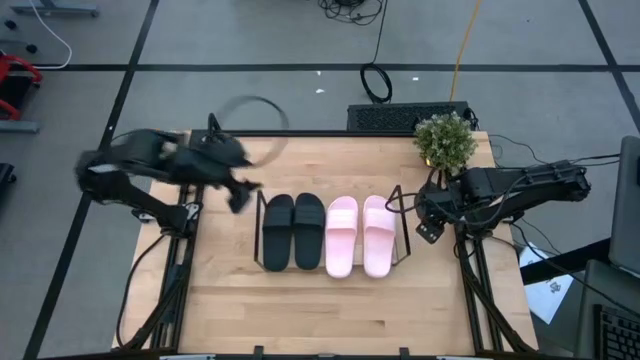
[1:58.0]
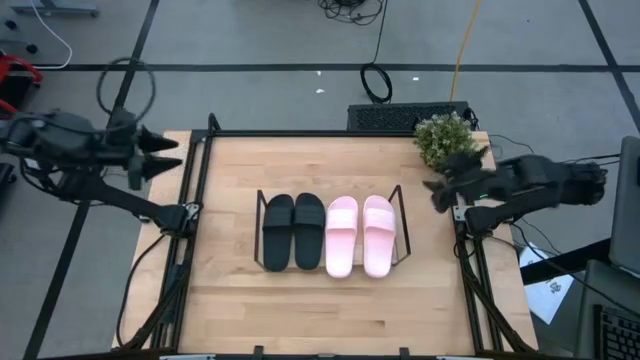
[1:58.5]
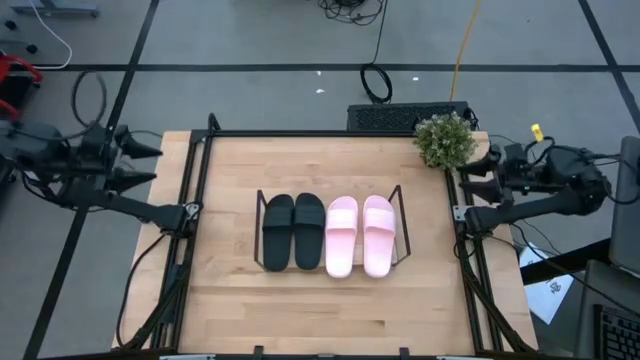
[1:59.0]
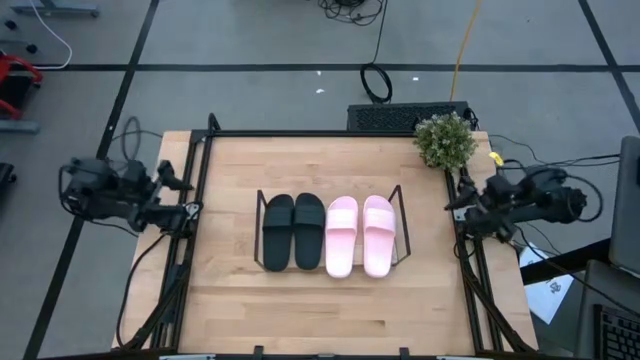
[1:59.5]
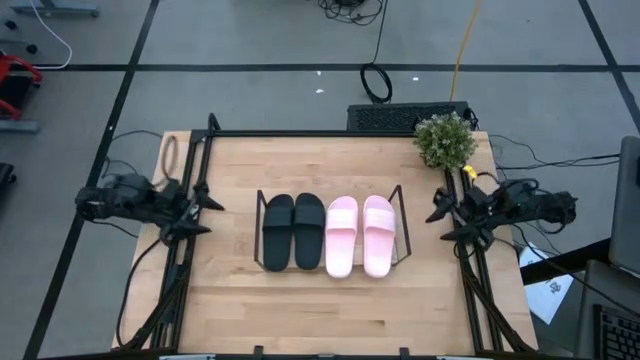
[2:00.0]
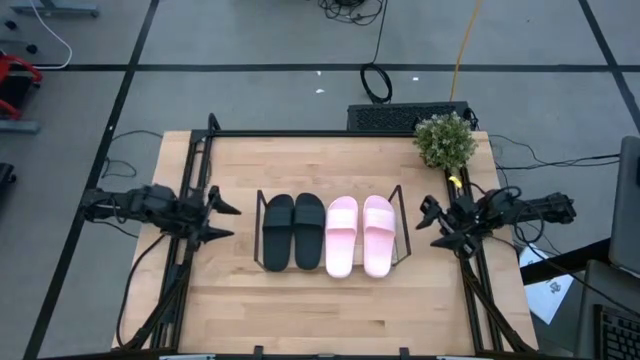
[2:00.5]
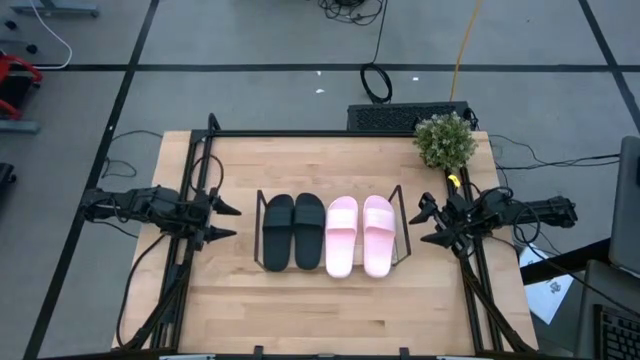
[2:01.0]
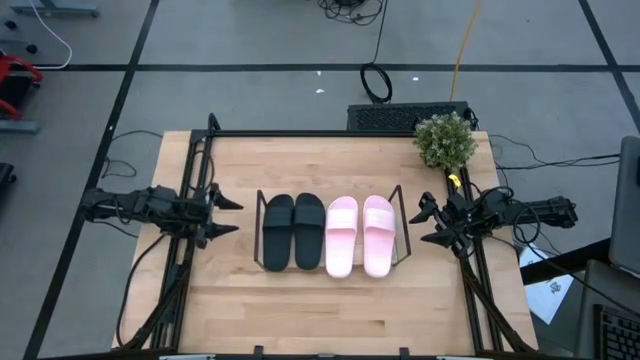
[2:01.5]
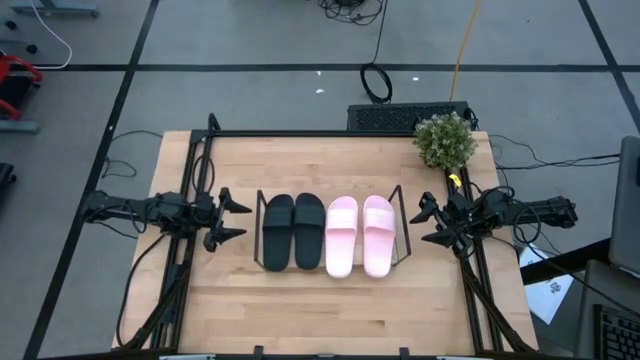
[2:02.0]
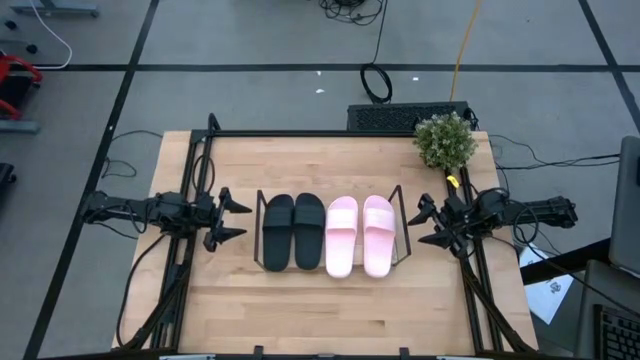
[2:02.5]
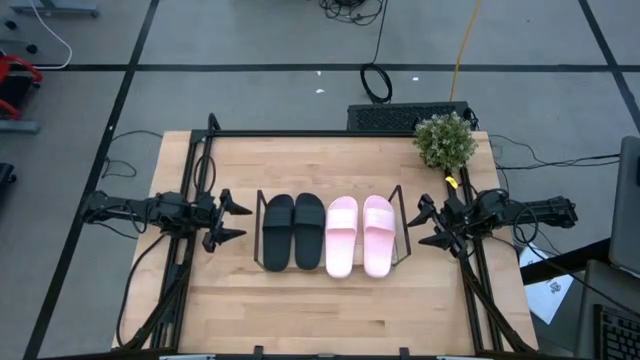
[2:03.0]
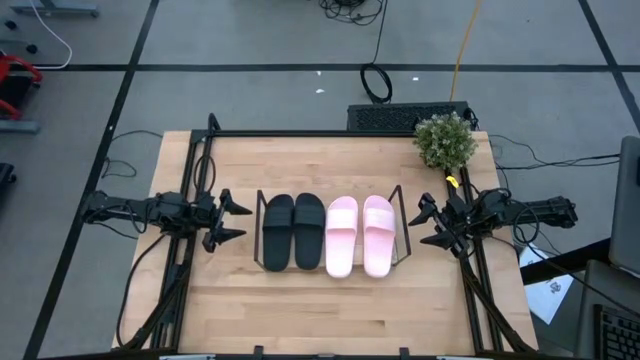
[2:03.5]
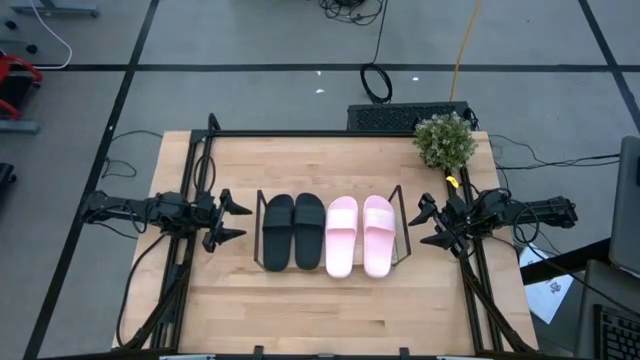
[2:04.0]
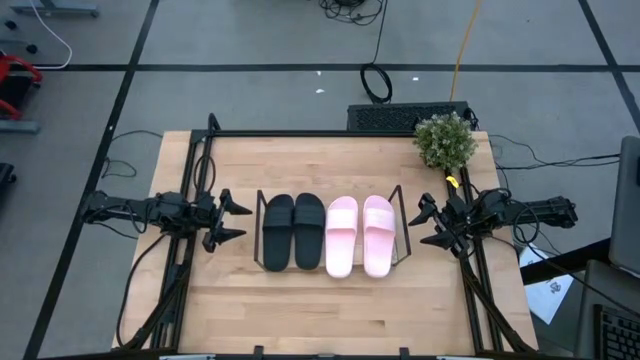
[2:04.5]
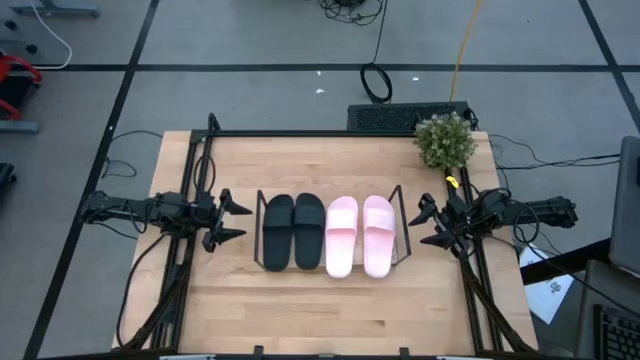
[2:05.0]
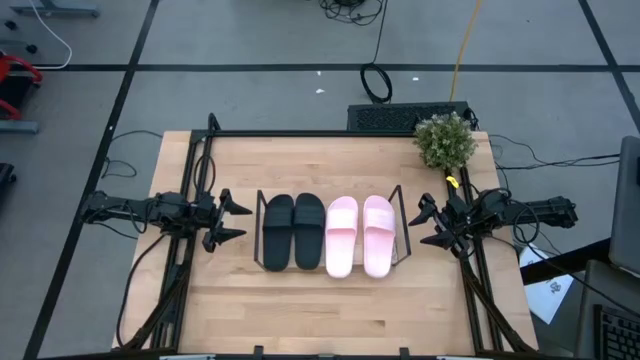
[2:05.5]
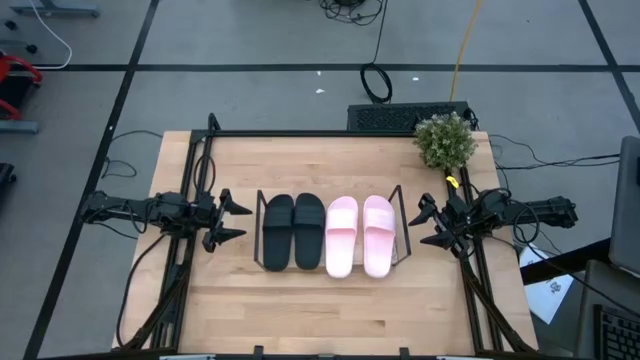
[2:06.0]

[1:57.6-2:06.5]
Task: Pick and place slides into the shelf
Return to Home Position

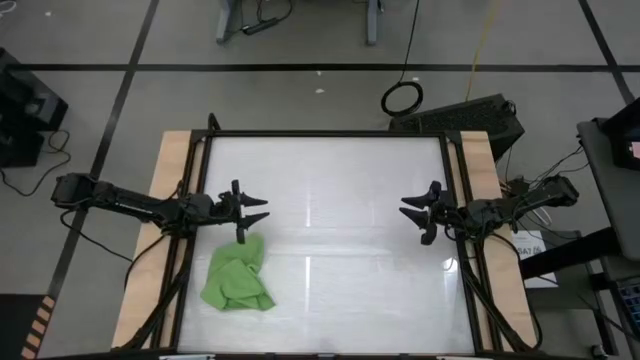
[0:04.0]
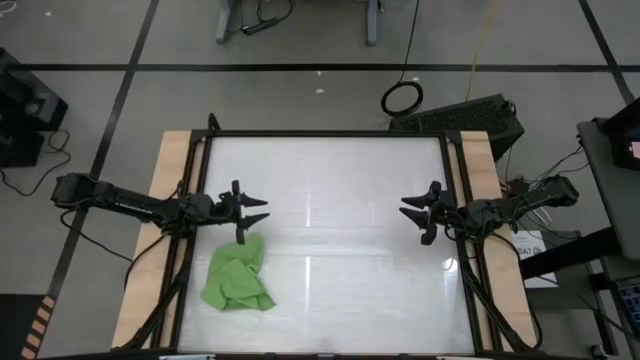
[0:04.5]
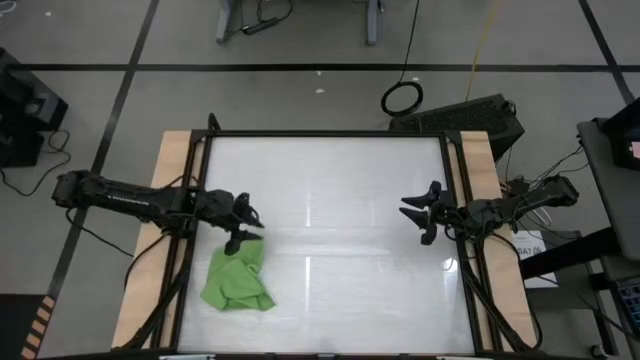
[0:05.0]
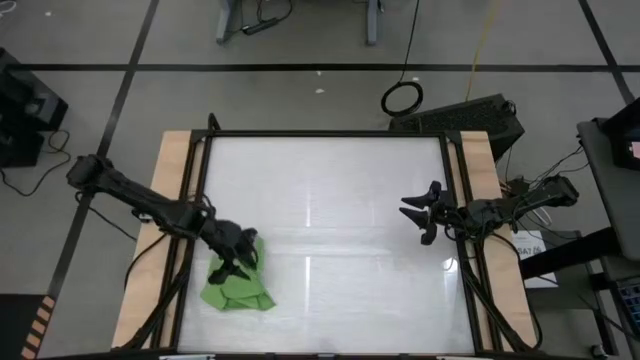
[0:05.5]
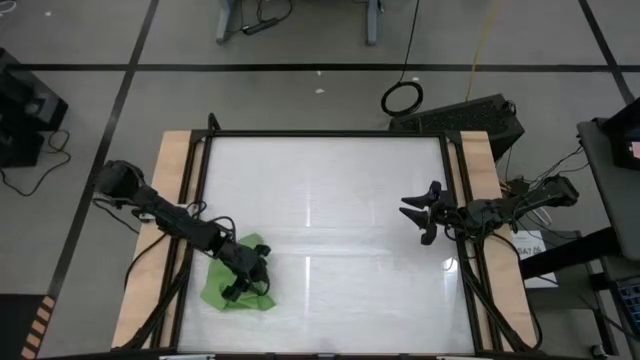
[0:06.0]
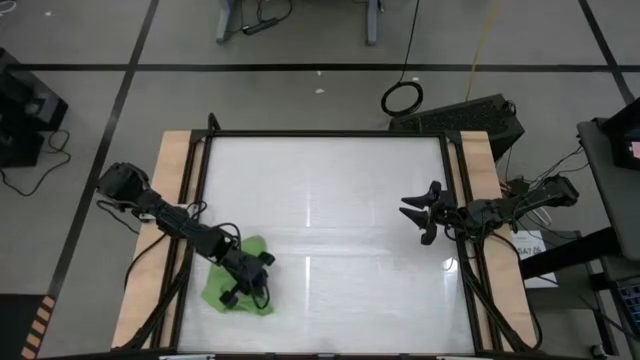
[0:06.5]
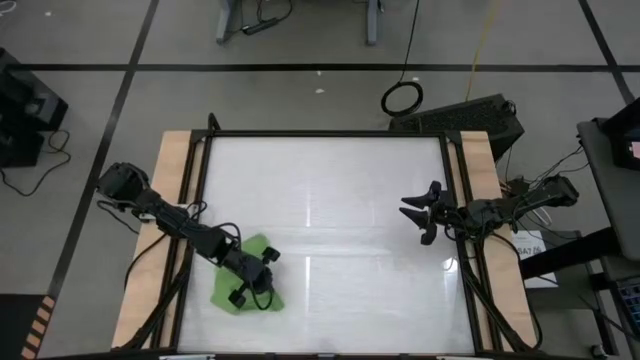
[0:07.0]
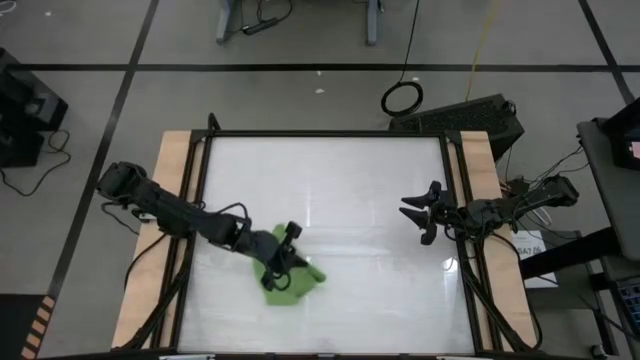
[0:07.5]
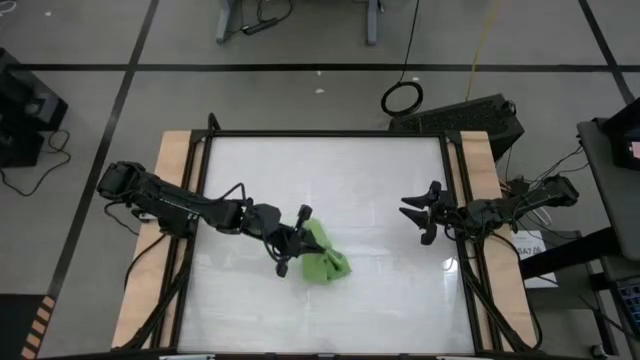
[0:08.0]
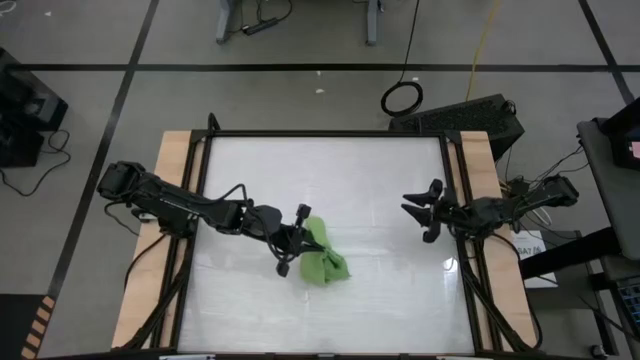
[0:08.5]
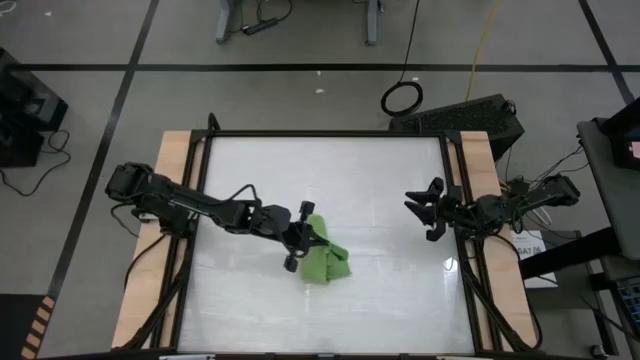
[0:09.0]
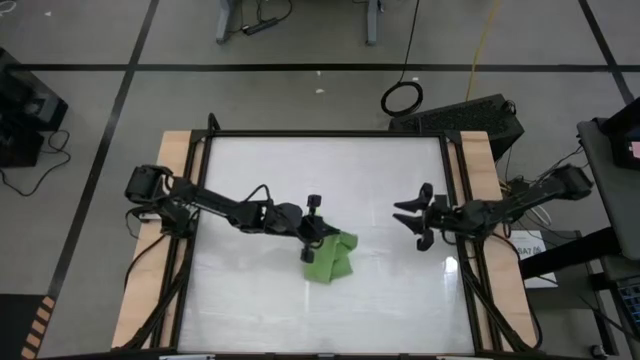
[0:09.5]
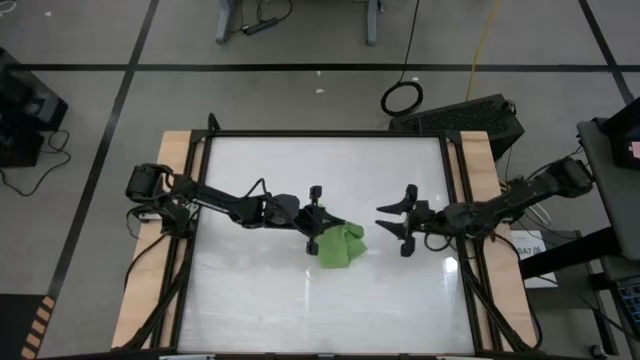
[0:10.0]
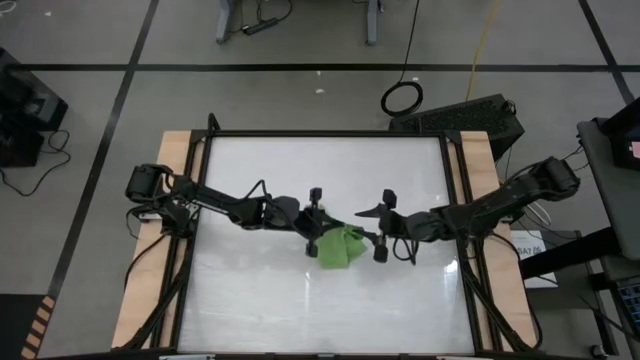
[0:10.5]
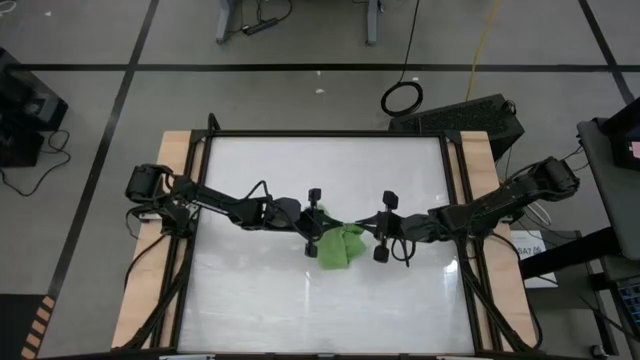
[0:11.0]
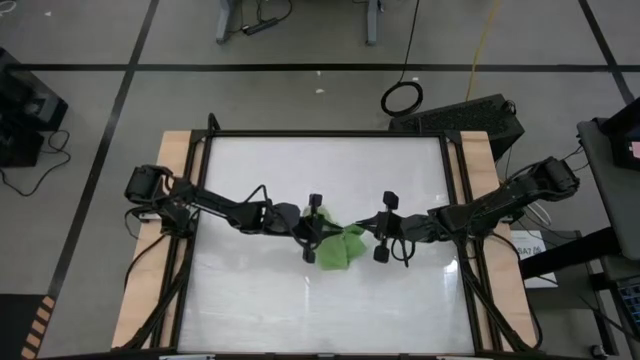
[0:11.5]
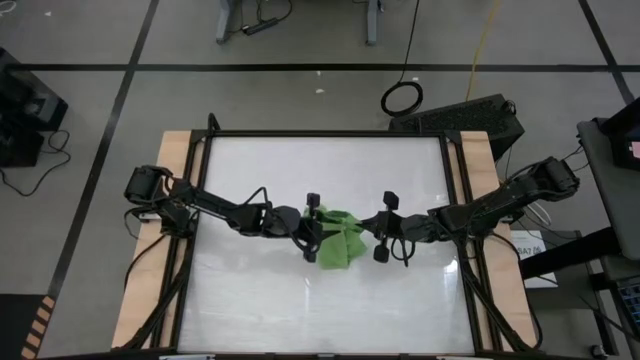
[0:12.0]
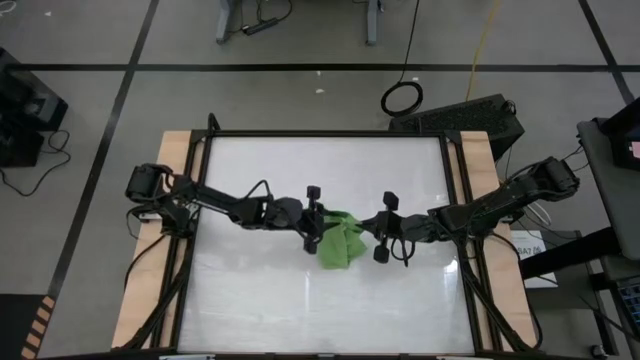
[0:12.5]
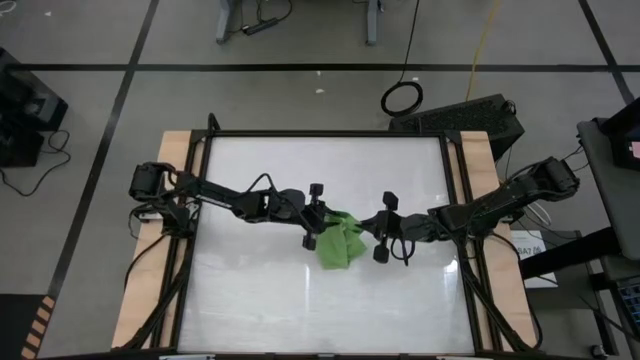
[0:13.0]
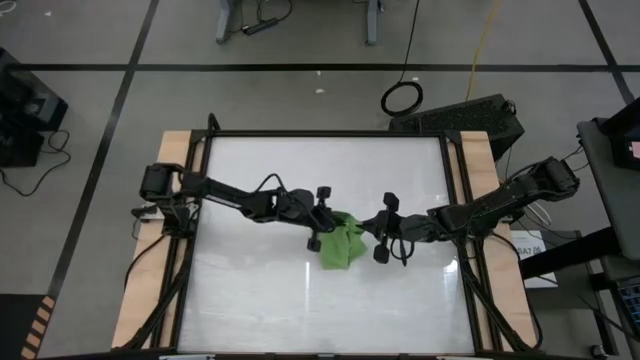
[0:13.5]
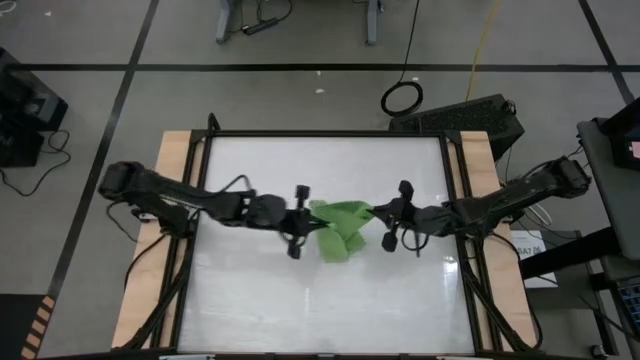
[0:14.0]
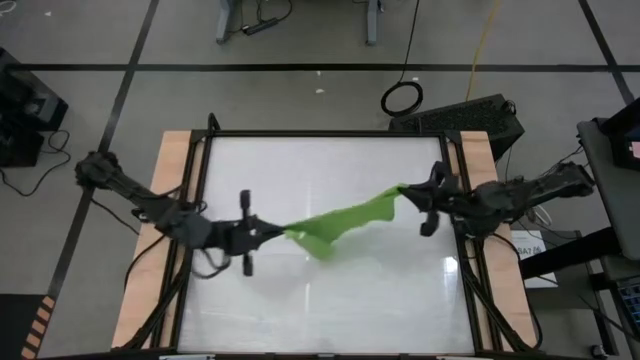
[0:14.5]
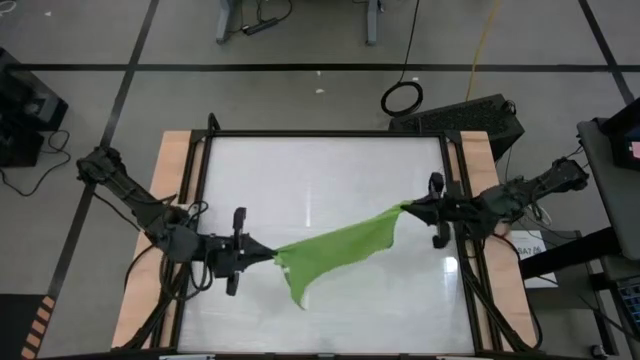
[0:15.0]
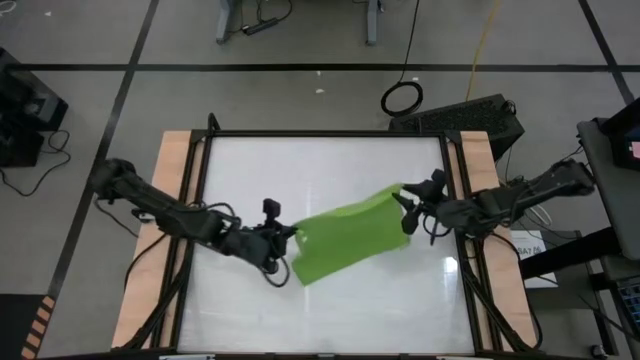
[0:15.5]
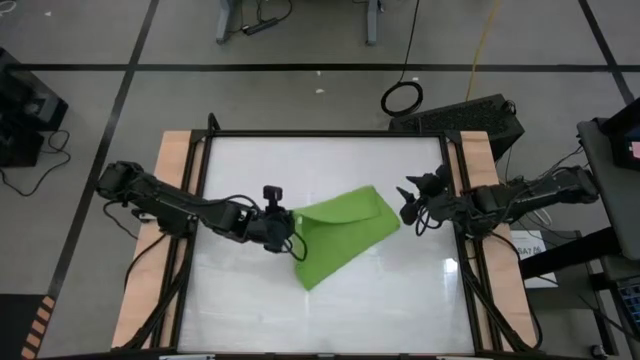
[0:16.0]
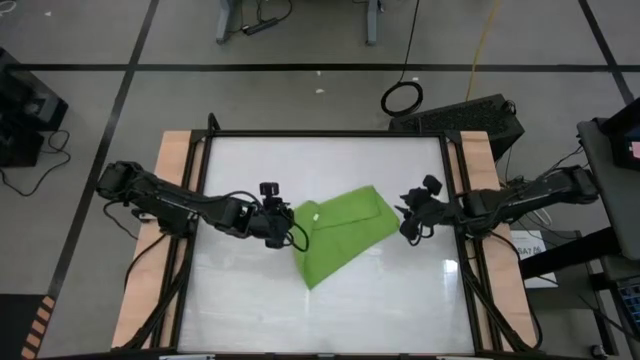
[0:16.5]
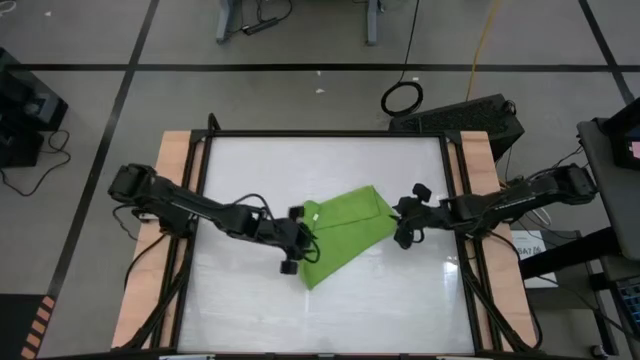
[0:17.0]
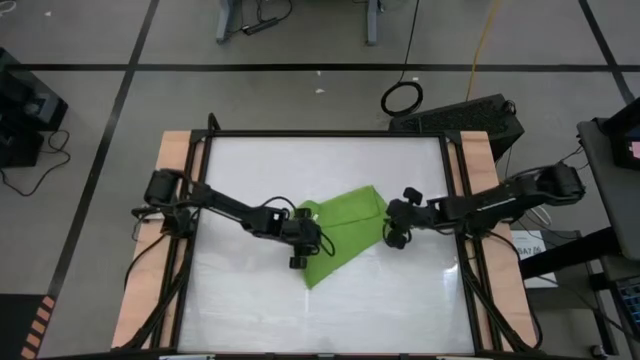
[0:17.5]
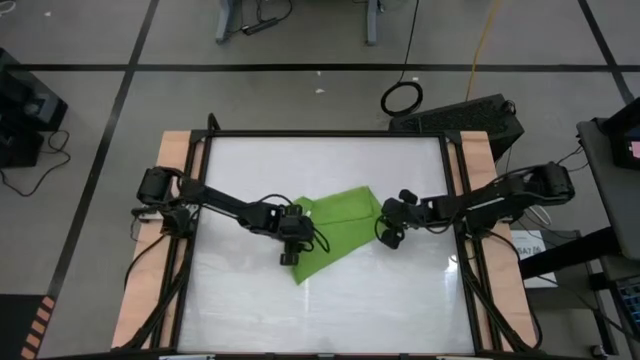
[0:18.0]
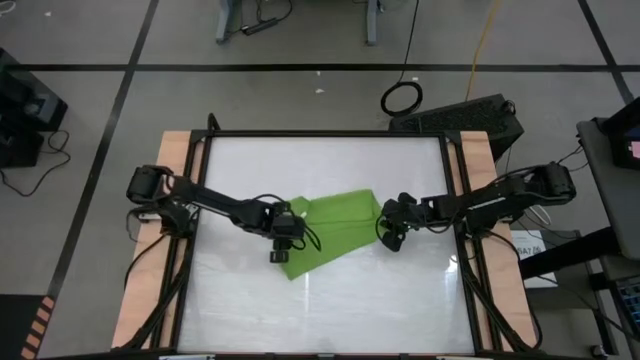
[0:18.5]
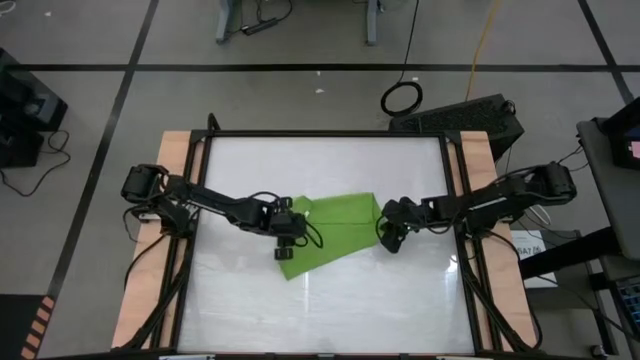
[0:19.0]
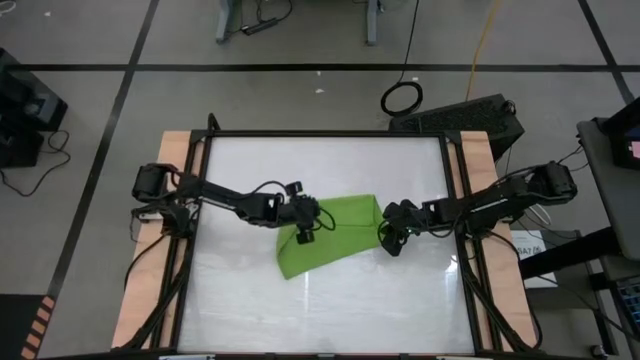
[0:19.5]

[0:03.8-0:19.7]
Task: Roll towel
Fold the green towel
